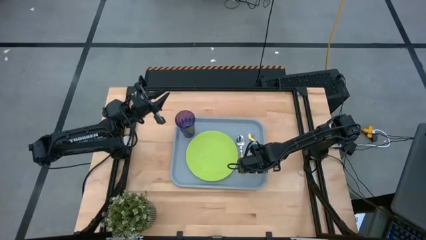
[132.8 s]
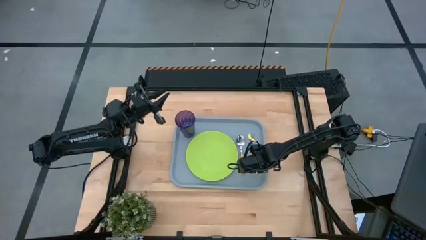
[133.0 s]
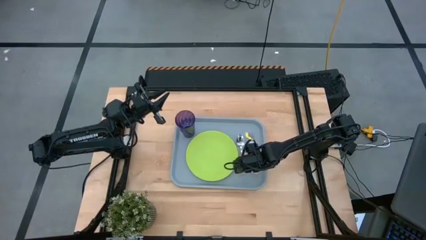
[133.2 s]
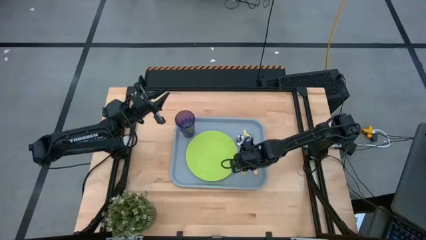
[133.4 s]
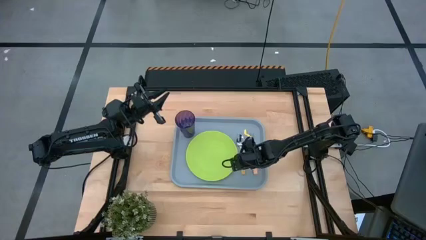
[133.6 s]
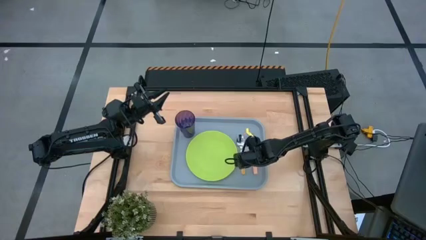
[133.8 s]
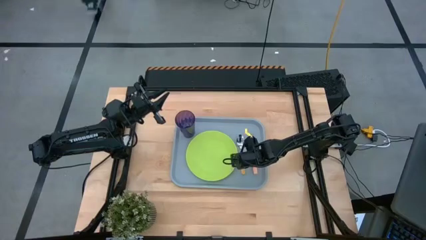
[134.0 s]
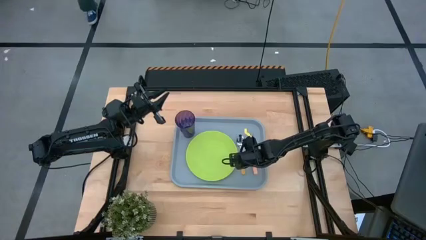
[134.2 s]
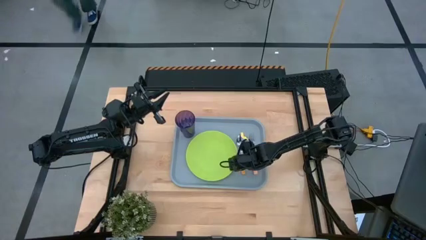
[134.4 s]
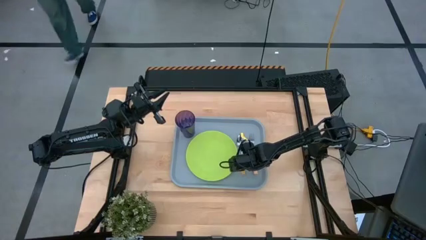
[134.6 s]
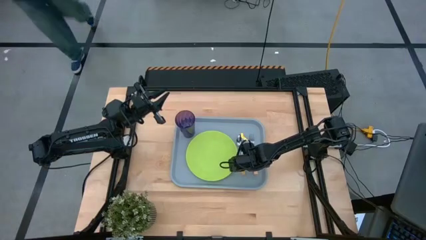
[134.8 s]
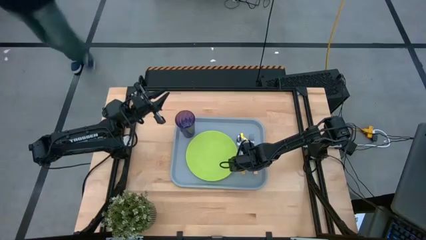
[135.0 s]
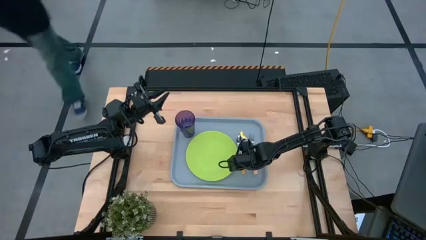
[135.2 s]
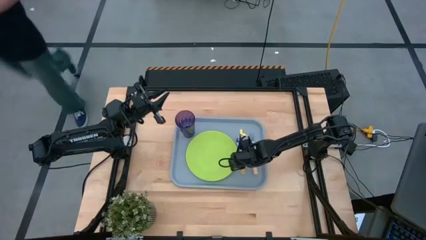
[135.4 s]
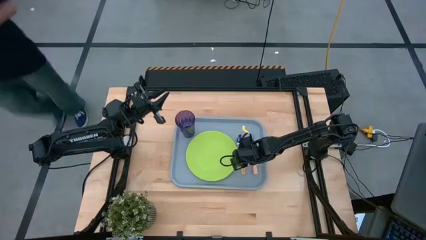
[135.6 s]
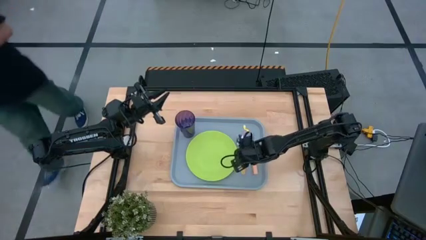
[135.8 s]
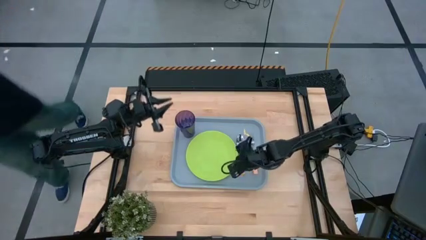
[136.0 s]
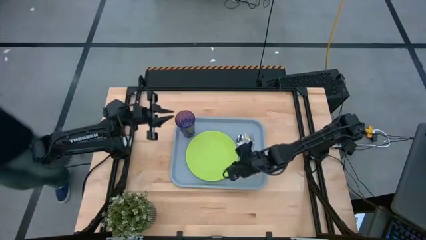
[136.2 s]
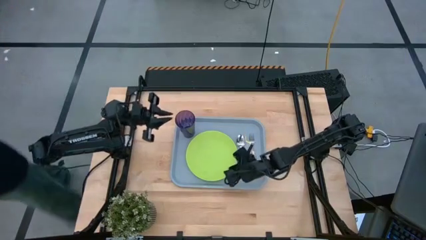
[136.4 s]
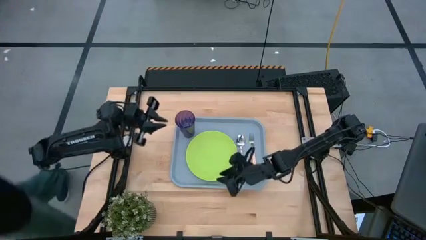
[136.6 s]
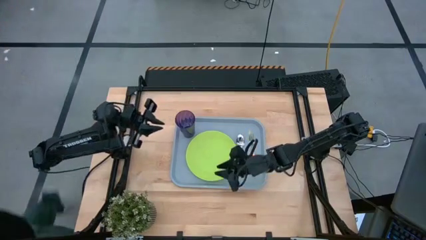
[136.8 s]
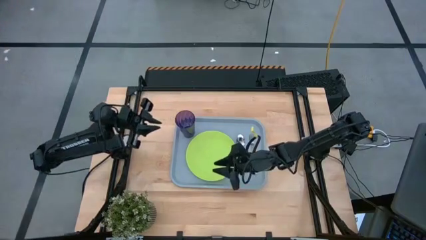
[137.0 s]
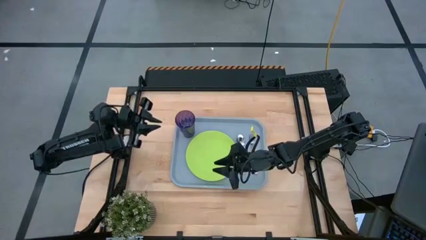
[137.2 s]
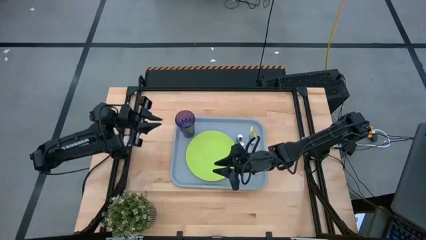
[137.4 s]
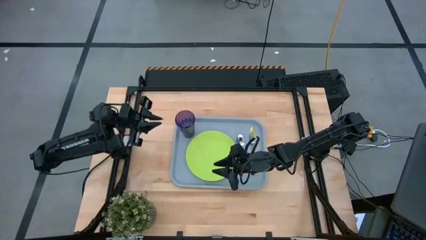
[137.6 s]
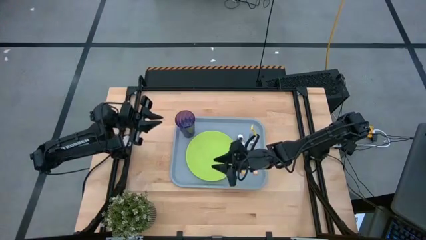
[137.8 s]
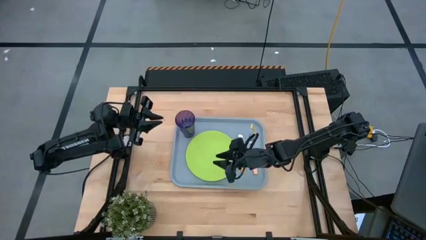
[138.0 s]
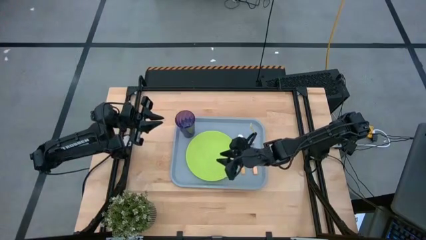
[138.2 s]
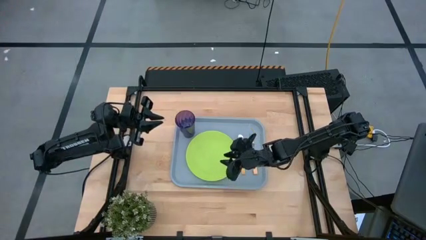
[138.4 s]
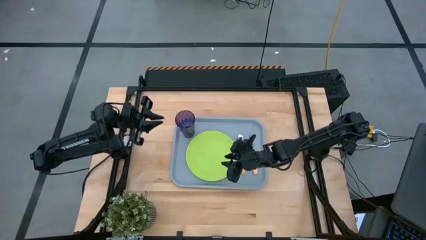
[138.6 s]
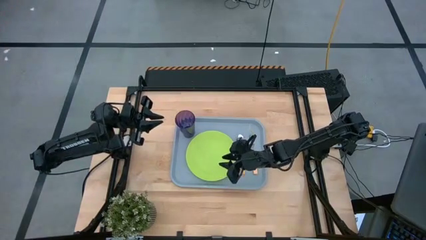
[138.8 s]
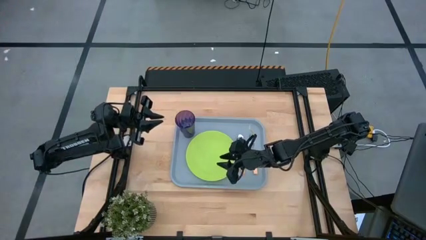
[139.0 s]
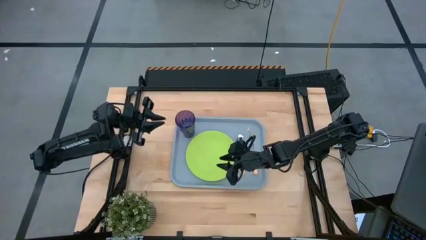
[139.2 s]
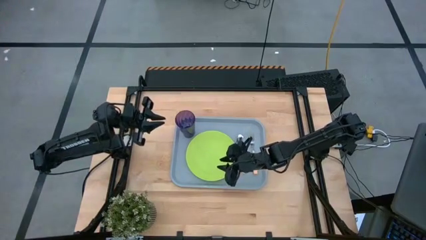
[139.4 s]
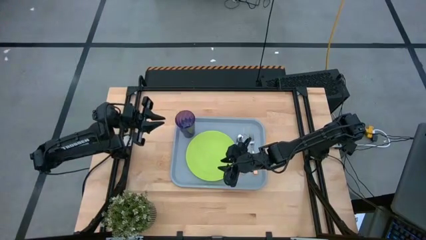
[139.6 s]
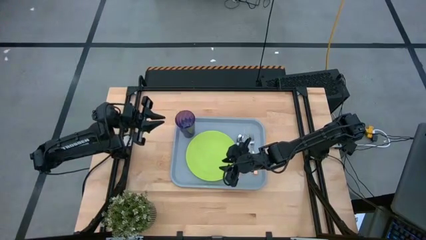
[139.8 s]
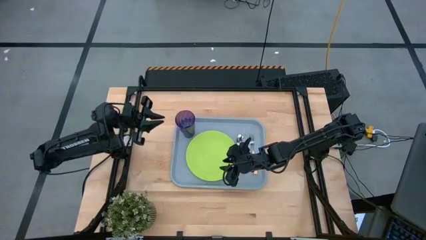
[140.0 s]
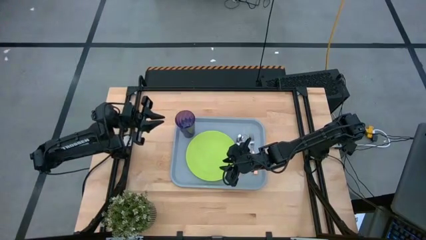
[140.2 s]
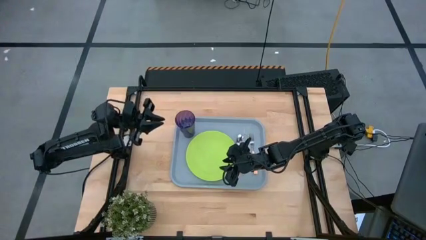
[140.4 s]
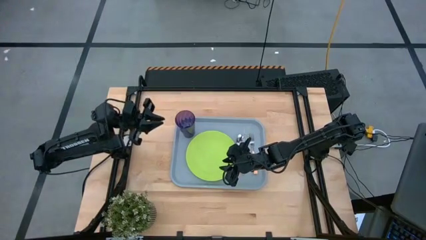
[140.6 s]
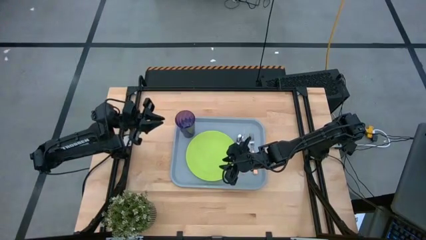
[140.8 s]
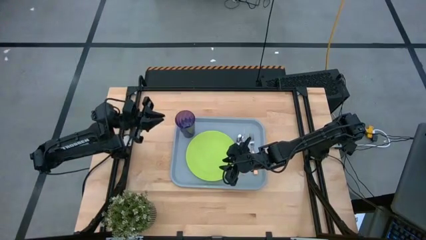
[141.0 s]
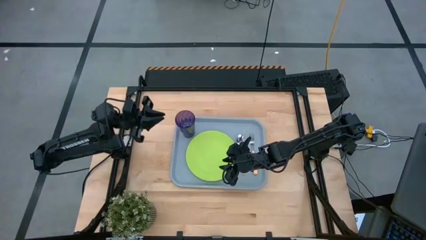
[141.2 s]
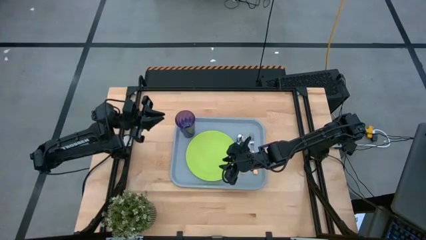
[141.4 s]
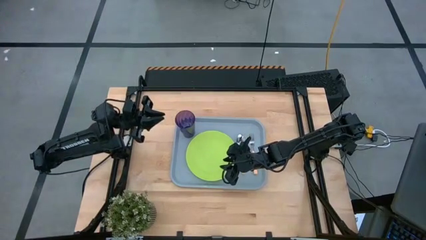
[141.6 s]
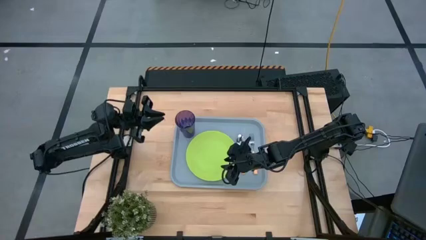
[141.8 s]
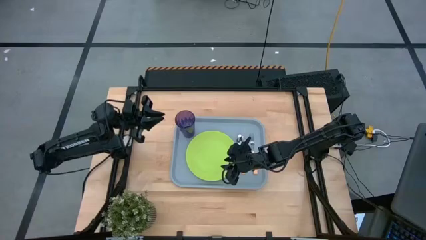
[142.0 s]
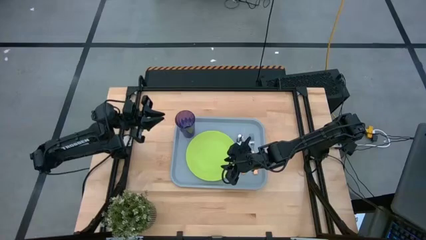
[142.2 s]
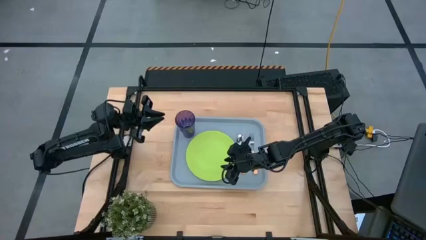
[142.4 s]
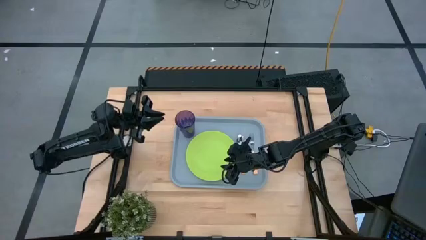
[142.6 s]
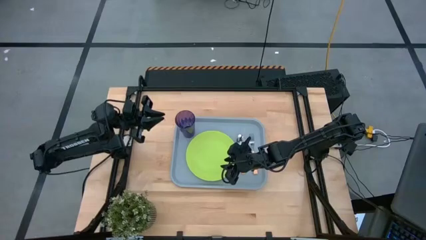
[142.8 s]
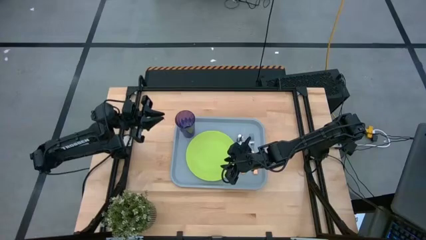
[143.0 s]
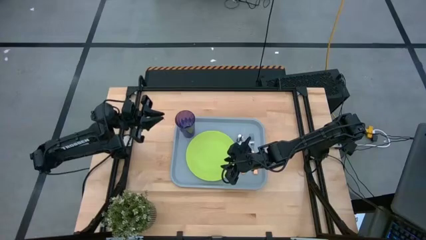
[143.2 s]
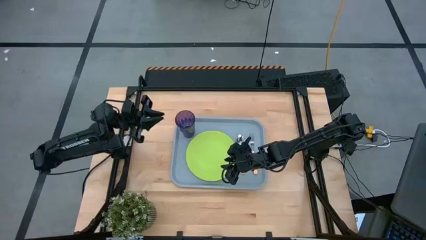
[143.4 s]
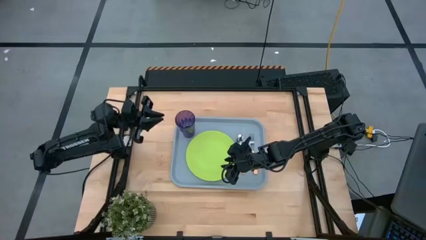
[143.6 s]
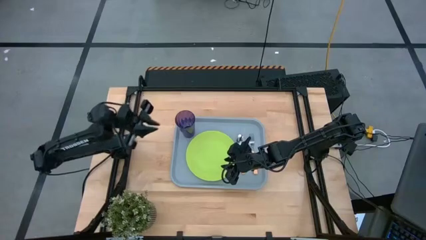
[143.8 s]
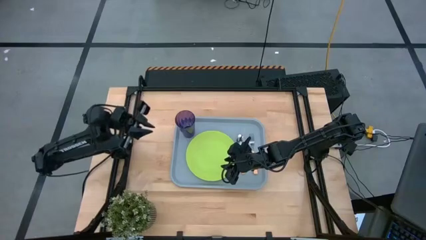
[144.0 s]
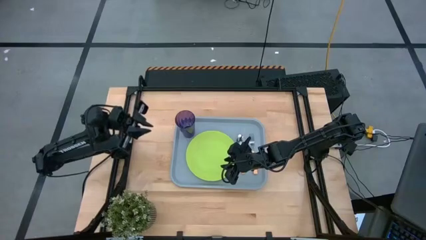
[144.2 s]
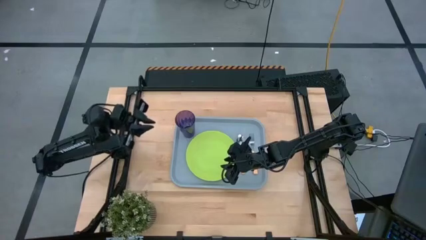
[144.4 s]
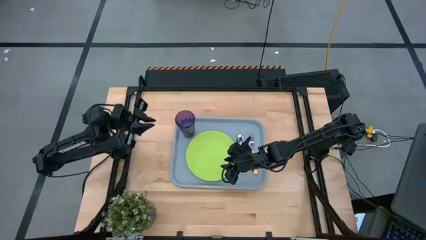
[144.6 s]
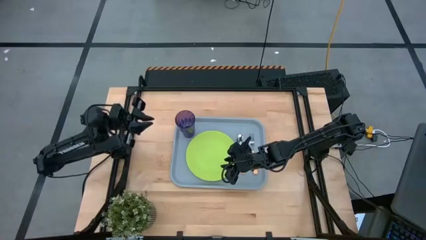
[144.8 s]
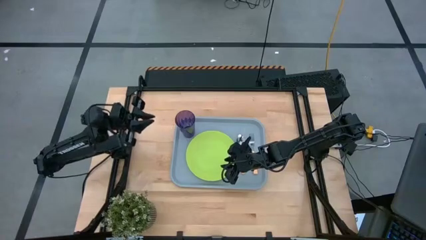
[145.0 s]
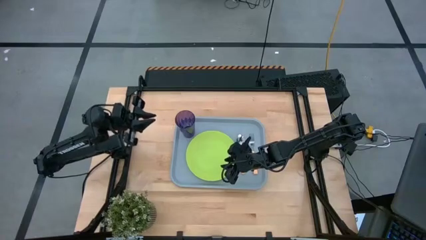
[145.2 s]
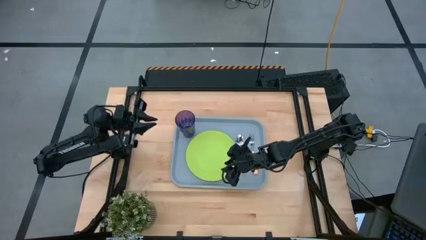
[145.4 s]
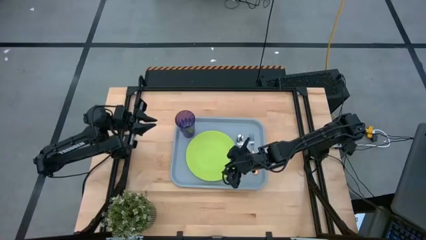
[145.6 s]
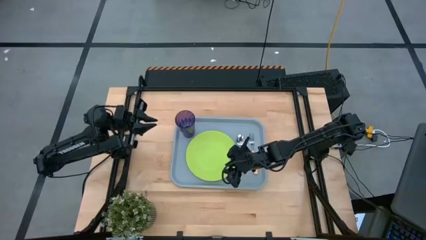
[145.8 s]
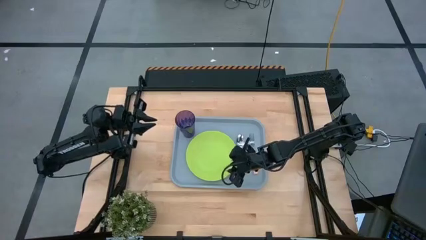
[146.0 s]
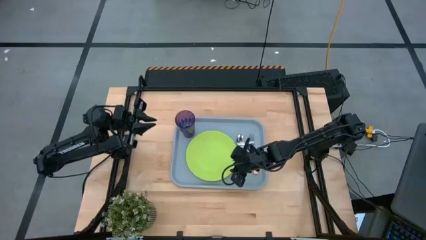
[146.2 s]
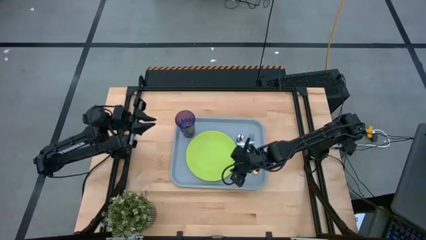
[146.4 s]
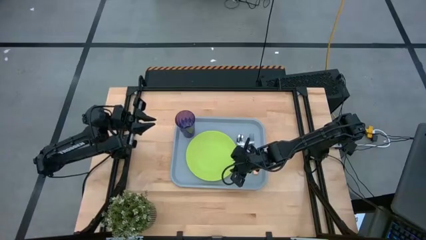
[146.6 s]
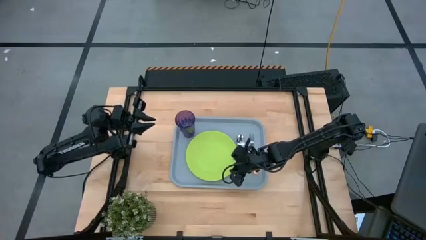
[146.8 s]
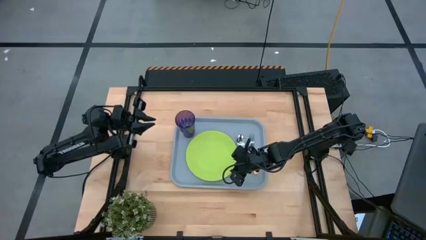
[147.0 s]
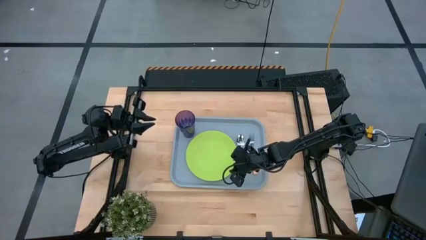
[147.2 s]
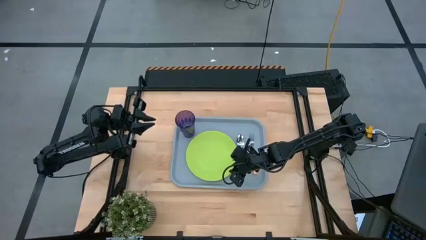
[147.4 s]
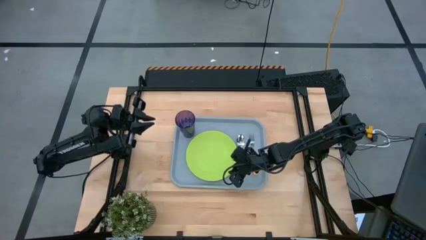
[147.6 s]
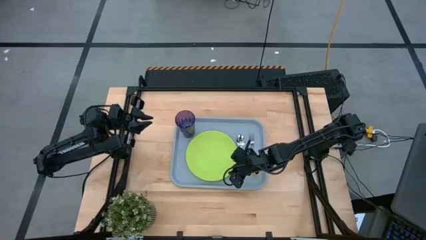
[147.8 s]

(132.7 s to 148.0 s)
Task: Pick and place plate/cup/fork/spoon on tray
Adjust the orange spoon and gray serving tray

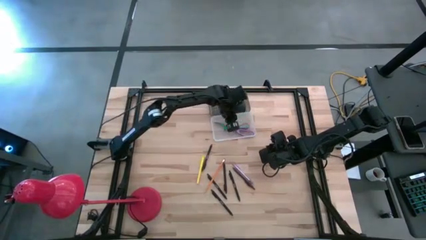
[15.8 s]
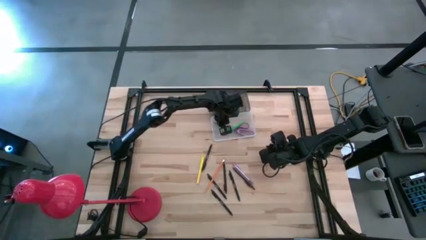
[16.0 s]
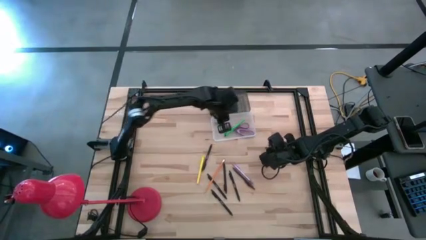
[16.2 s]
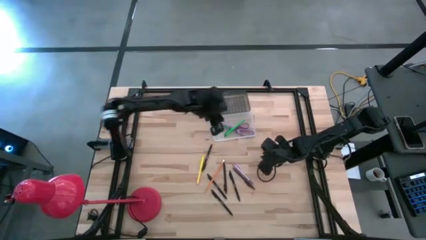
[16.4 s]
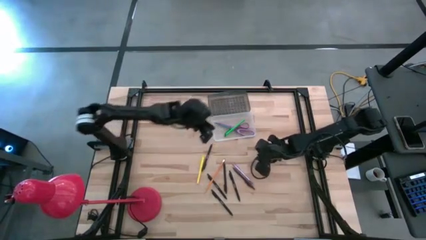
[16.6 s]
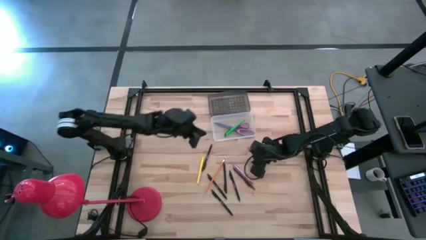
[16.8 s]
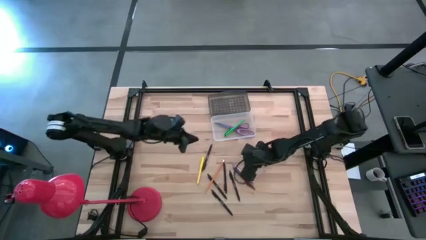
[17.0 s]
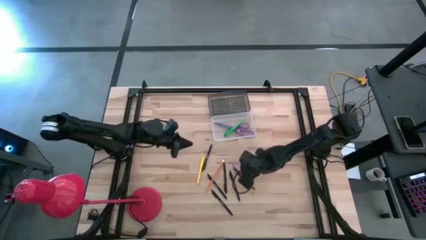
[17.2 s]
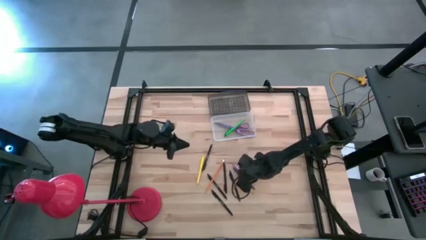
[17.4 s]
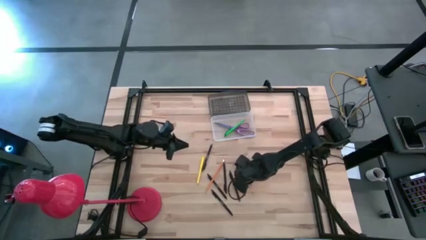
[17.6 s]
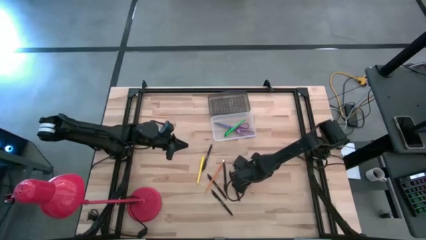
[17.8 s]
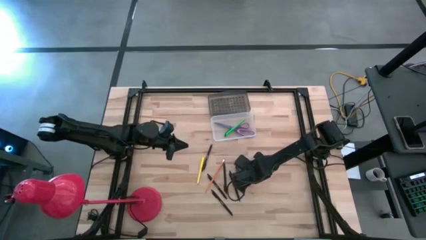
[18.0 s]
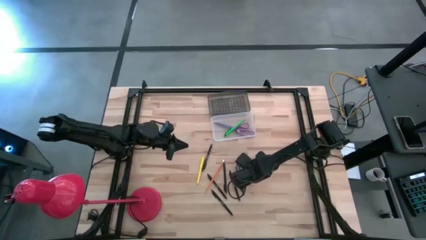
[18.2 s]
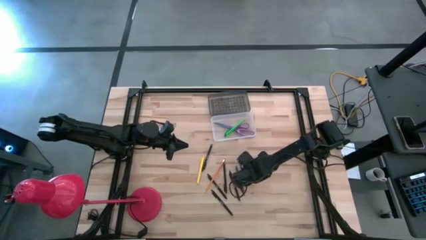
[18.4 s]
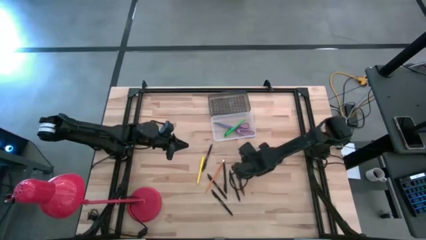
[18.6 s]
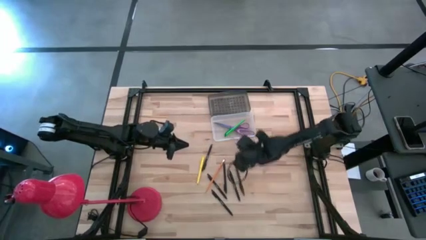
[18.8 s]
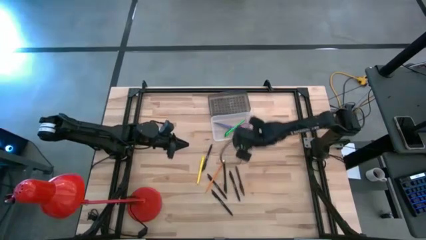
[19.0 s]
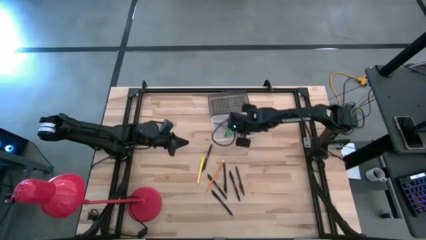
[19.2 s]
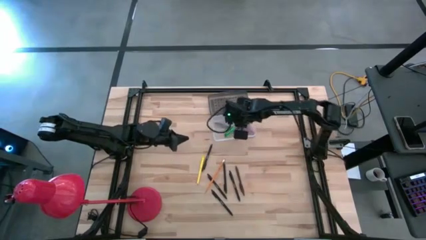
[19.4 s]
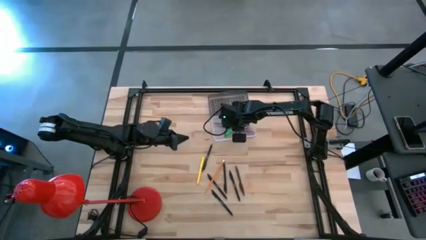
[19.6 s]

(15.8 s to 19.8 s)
Task: Pick & place school supplies into a supply box
Put the purple ballpen into the gray supply box
